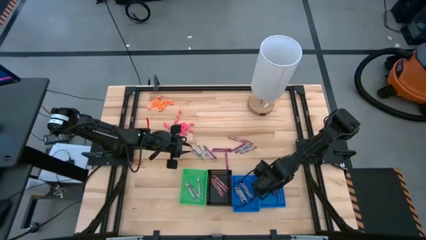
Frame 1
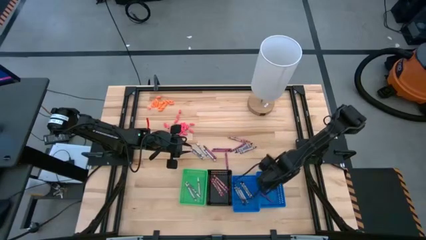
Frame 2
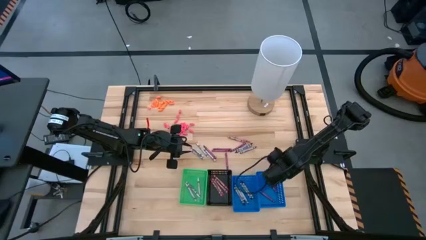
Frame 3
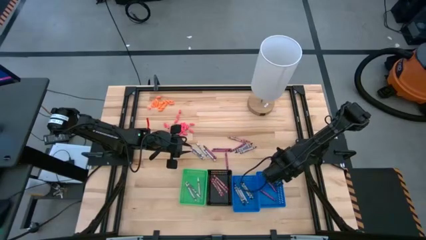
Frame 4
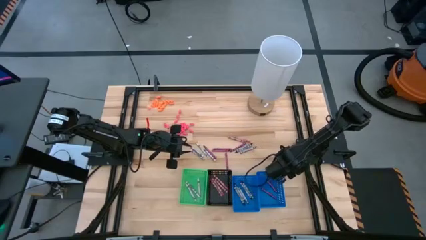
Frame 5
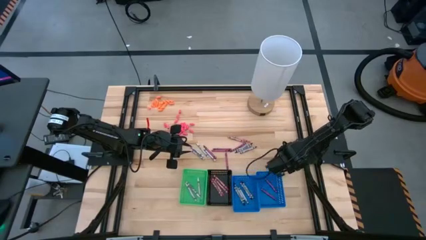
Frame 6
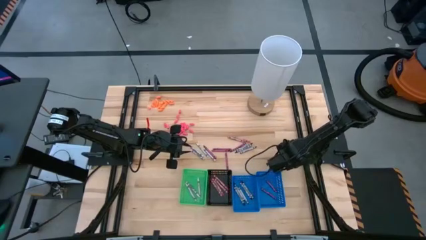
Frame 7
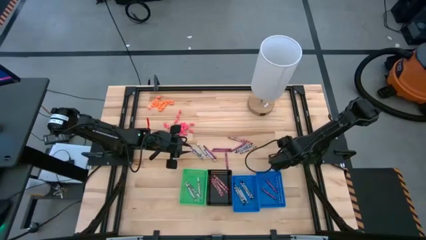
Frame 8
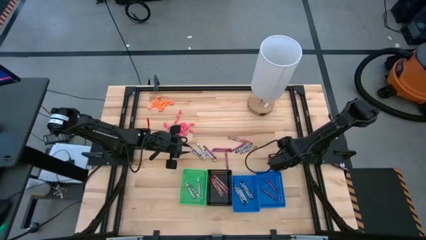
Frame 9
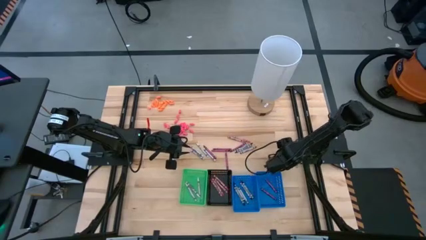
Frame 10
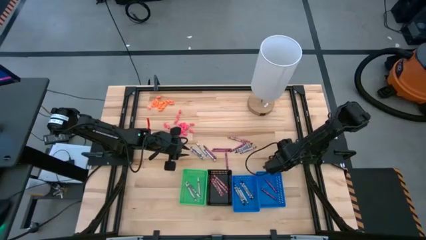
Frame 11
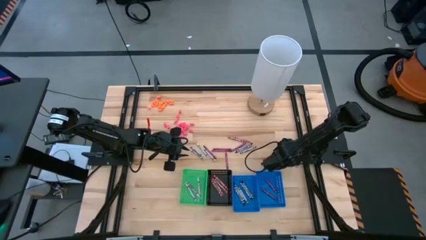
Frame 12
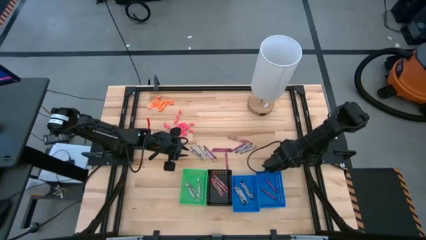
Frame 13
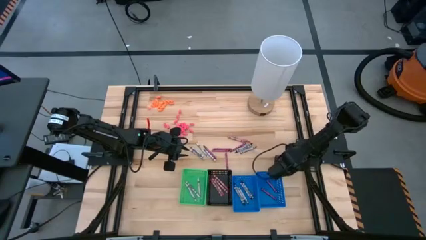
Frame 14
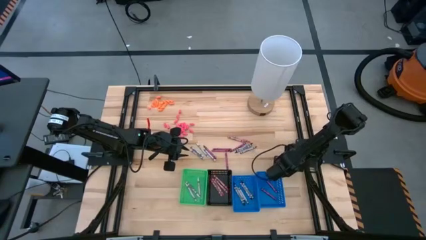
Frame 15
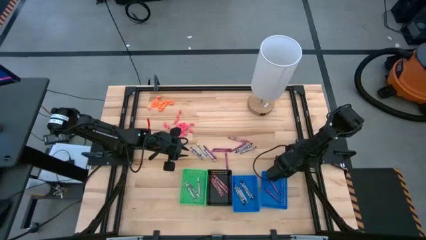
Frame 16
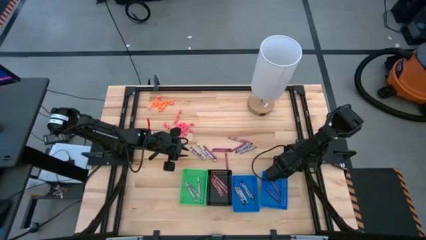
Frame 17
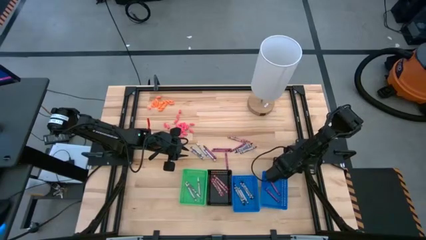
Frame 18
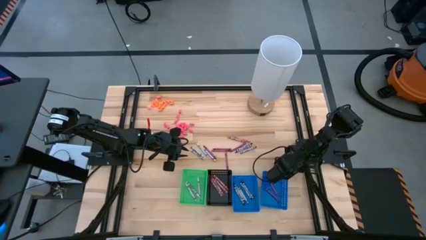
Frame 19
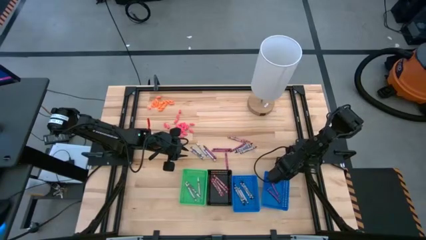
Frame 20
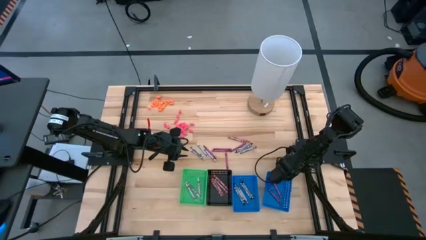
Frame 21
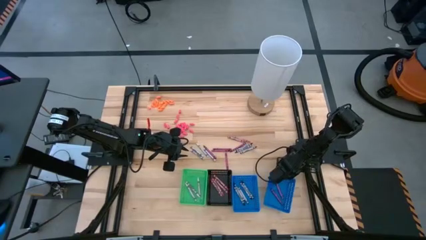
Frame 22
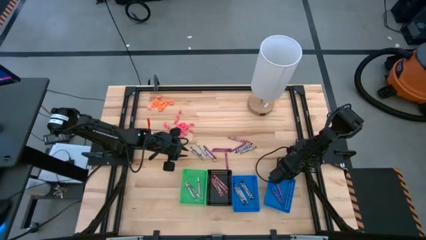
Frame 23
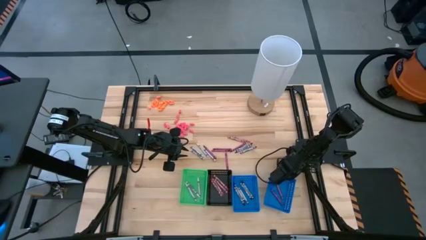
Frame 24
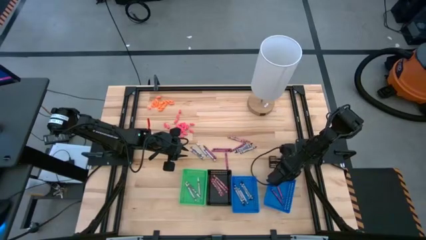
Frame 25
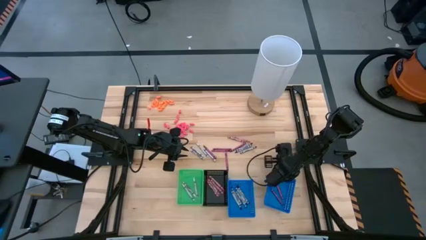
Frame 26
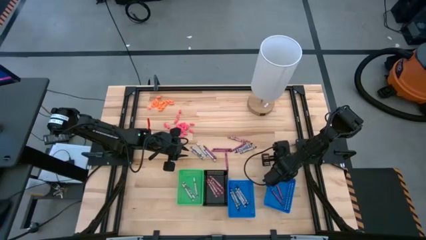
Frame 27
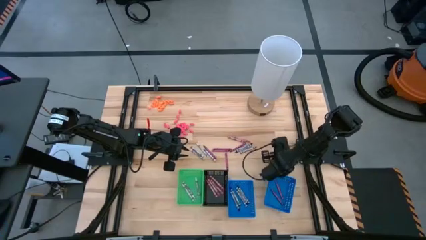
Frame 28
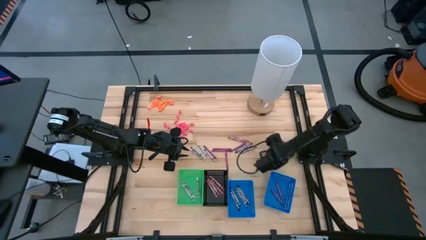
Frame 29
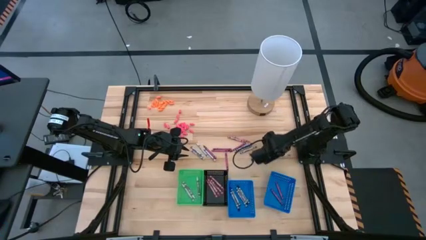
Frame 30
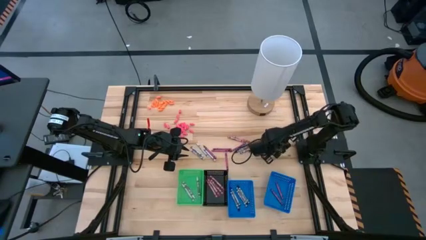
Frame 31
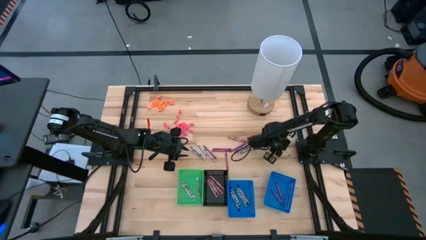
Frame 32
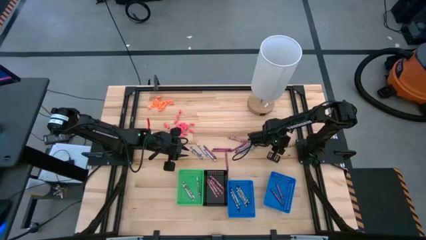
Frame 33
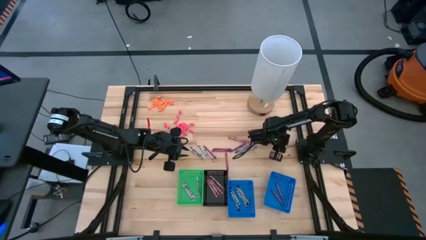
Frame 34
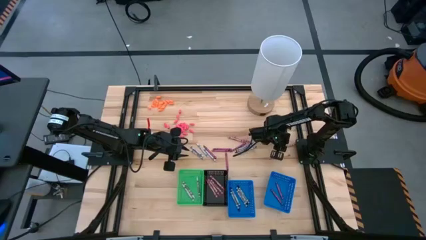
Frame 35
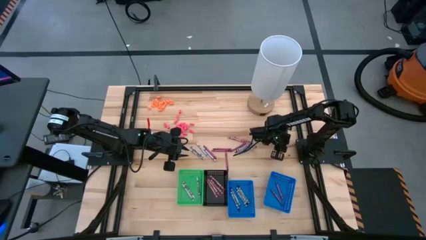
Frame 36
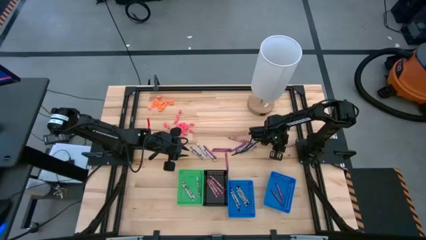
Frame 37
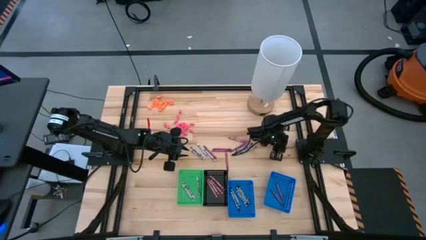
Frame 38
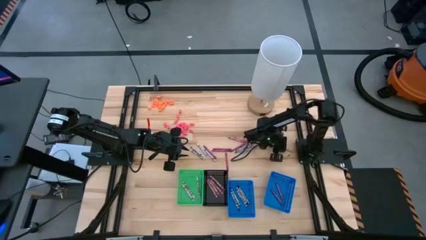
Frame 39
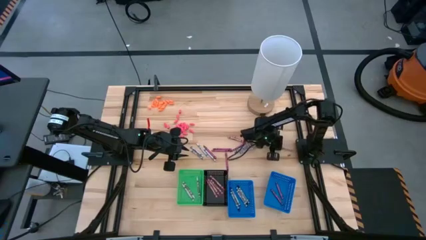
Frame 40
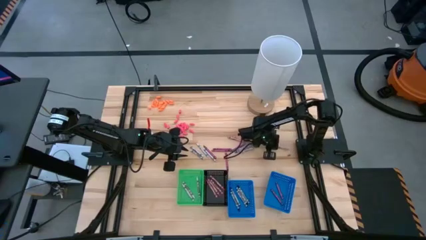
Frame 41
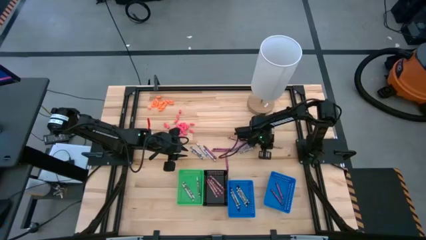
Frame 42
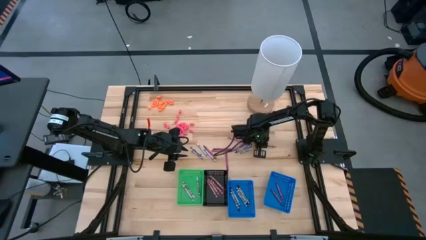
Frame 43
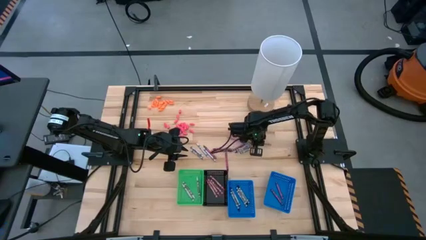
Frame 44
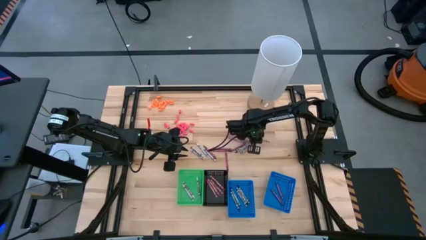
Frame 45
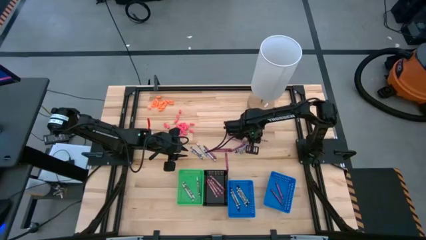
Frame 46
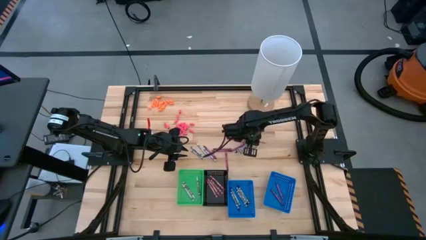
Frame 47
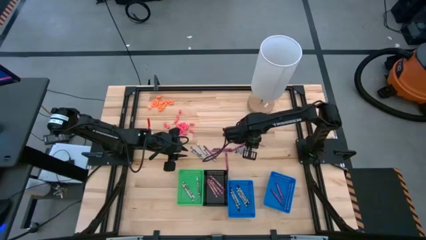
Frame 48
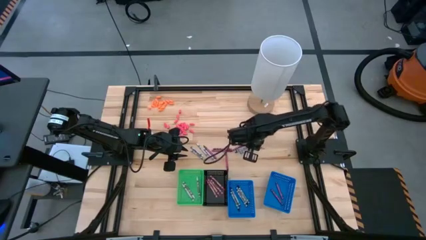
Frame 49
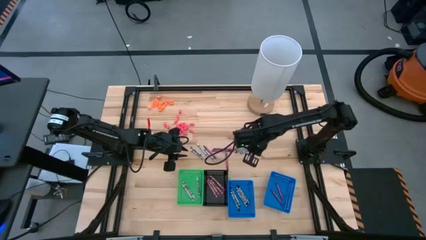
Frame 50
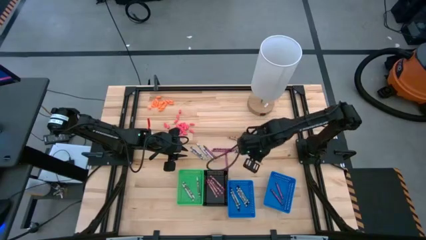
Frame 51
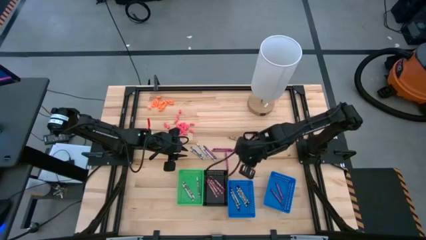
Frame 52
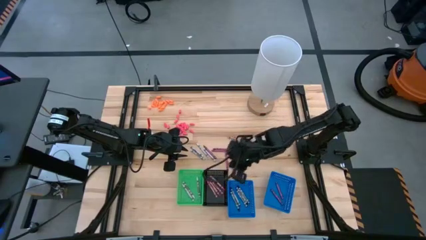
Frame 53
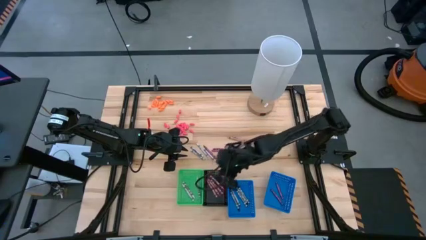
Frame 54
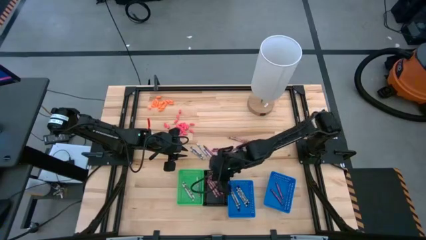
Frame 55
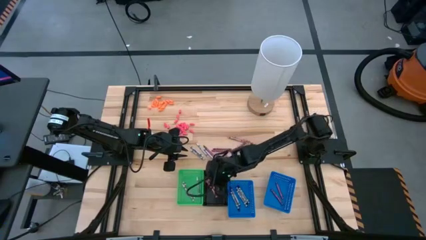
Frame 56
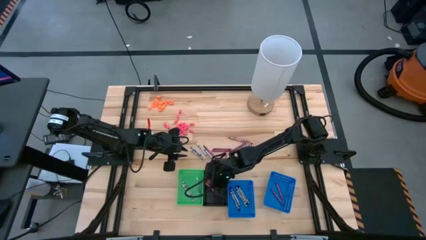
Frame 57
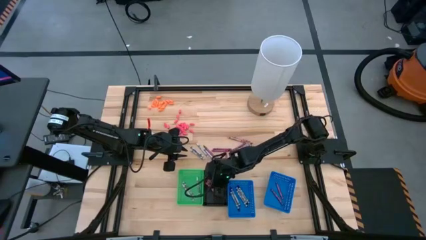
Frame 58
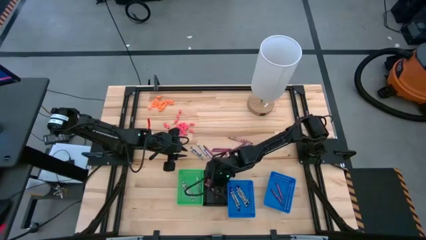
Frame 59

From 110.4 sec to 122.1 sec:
Task: Sort crayons
Put the pink crayon into the black bin

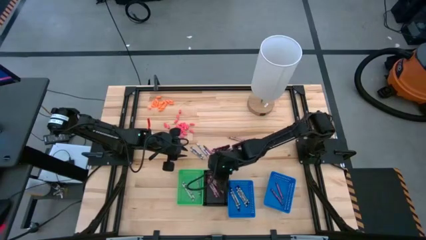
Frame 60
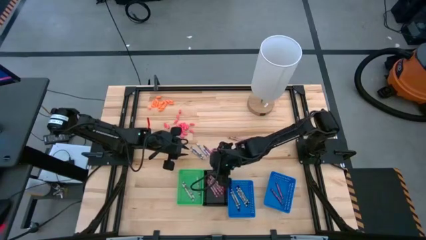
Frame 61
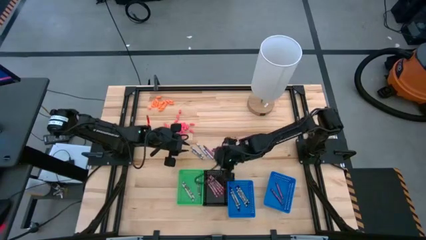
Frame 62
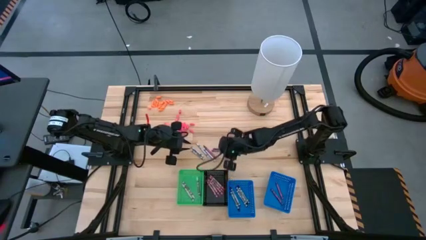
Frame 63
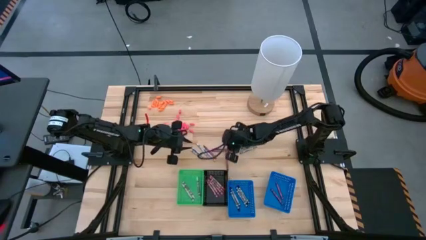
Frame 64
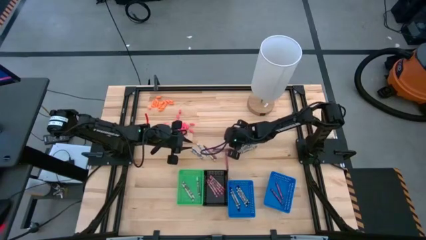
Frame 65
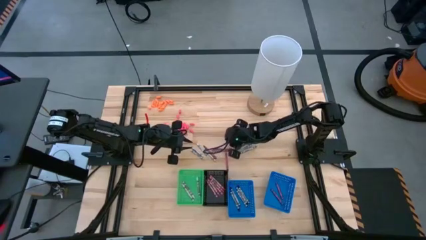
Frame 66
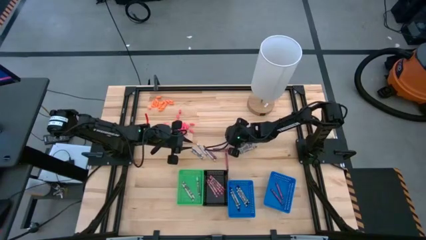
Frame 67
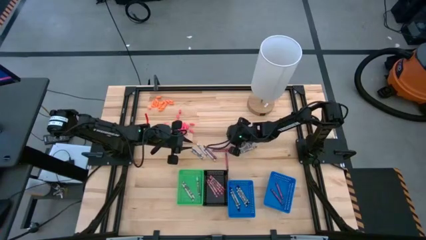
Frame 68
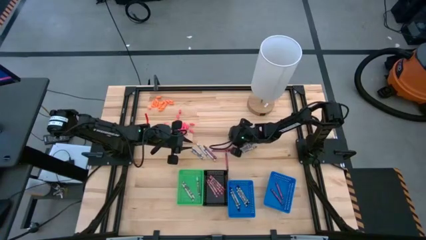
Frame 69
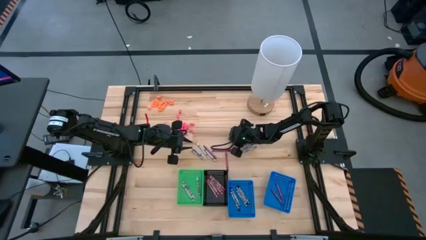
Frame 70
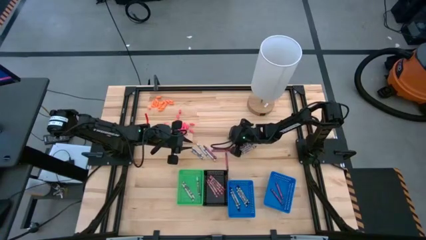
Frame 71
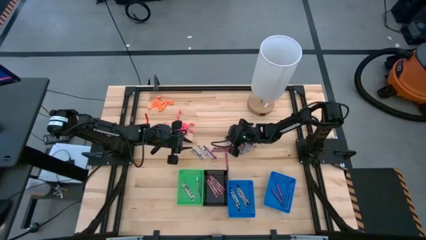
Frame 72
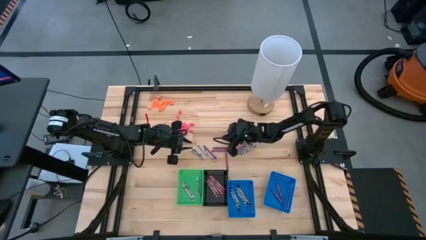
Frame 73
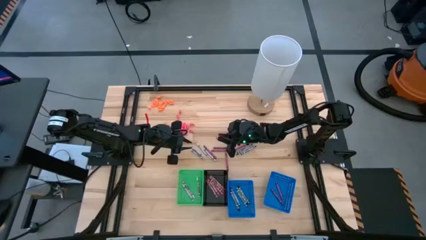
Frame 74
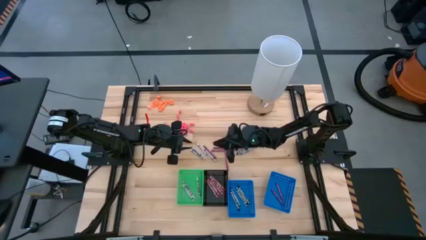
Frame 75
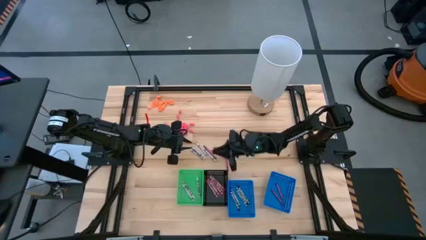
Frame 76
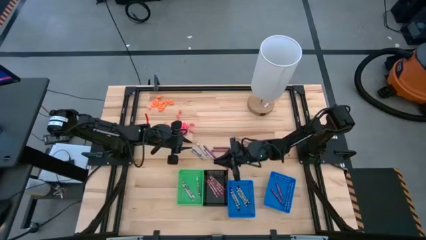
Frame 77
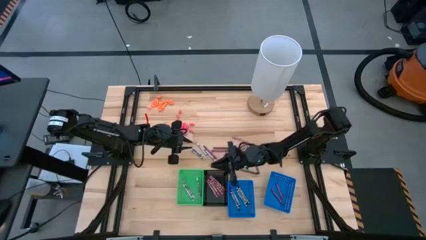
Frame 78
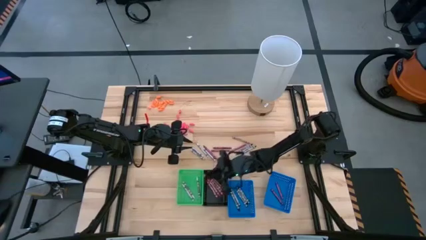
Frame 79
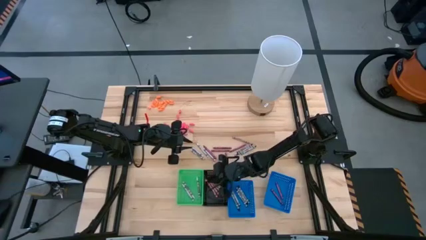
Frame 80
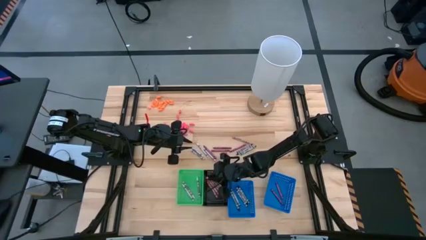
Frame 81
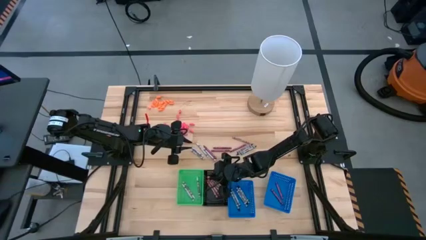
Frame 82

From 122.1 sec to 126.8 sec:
Put the pink crayon into the black bin
